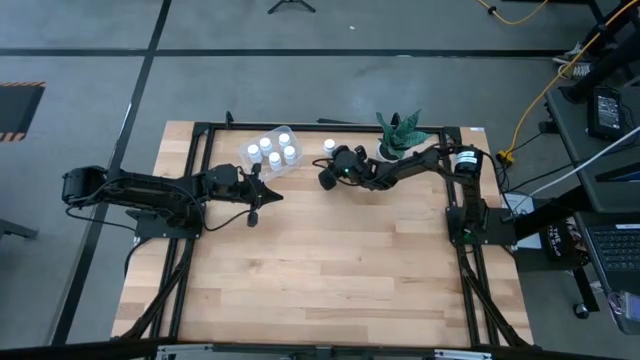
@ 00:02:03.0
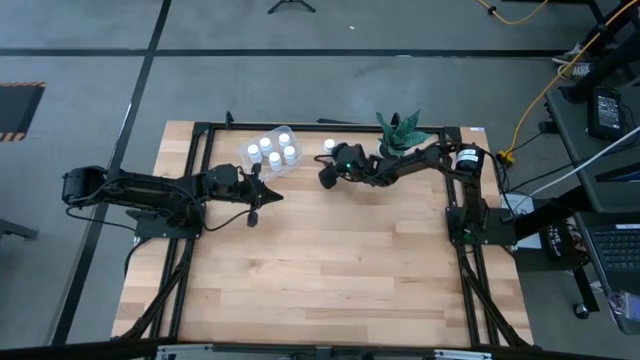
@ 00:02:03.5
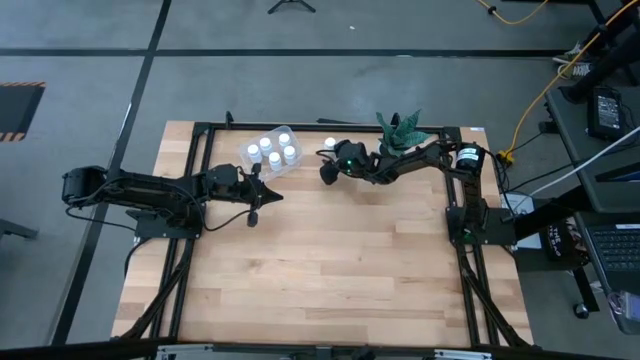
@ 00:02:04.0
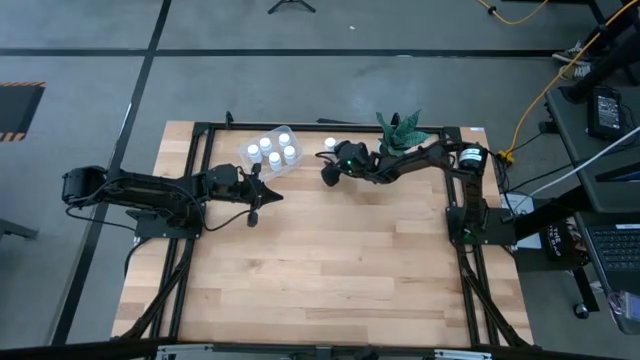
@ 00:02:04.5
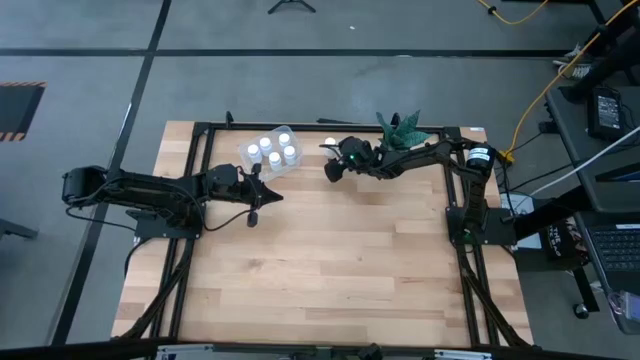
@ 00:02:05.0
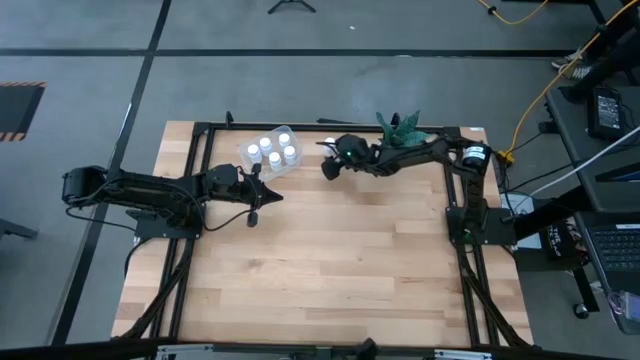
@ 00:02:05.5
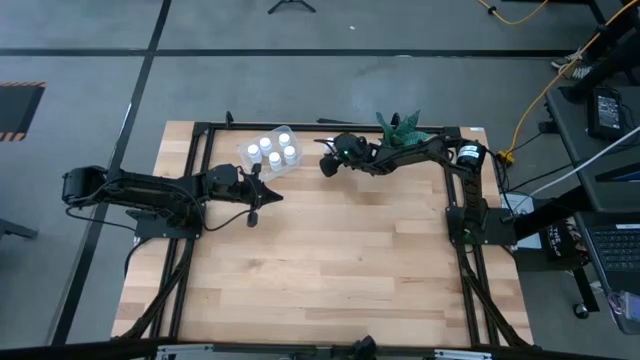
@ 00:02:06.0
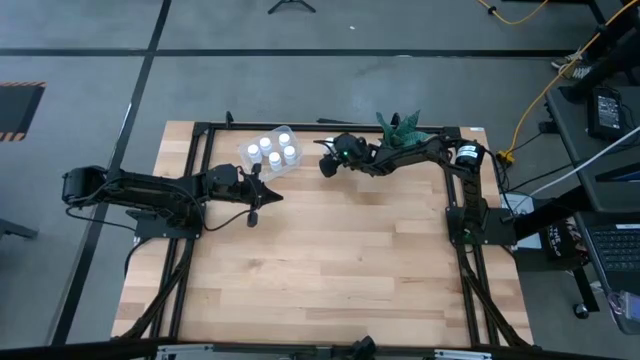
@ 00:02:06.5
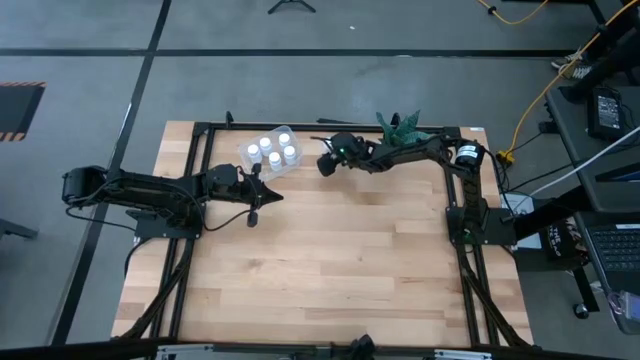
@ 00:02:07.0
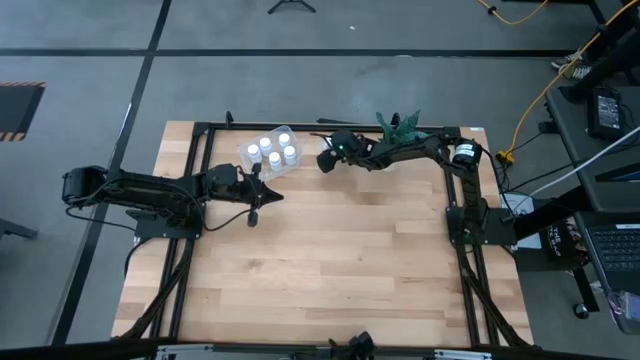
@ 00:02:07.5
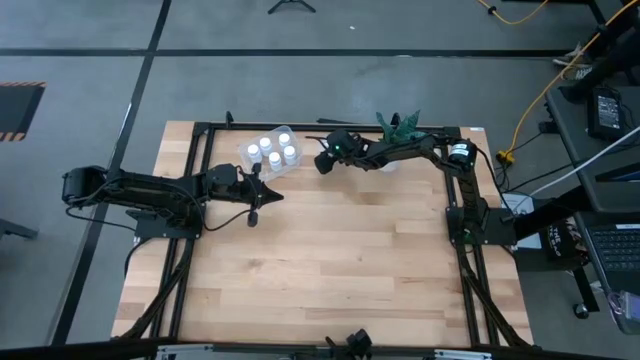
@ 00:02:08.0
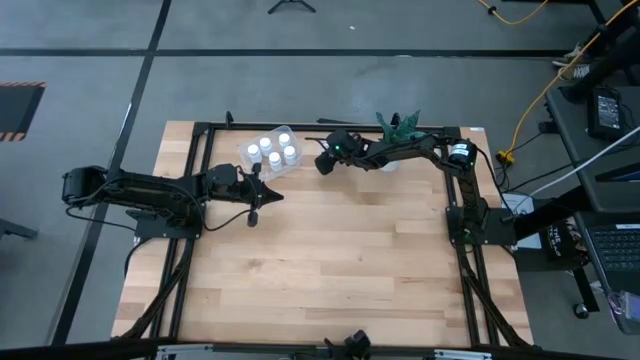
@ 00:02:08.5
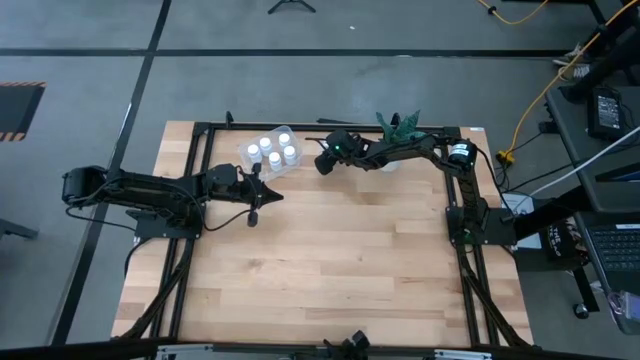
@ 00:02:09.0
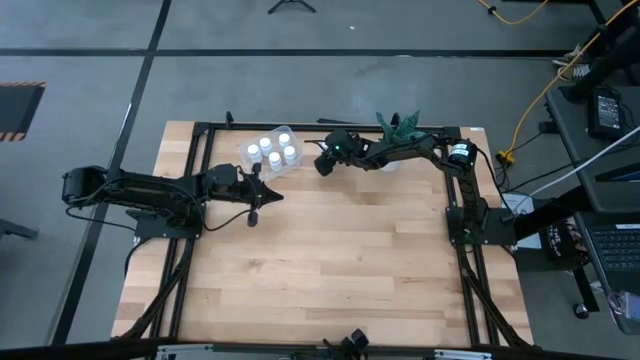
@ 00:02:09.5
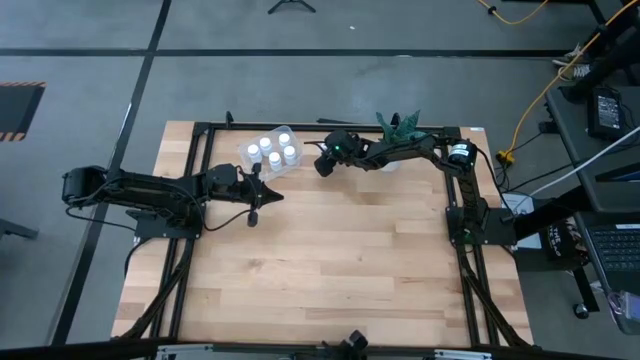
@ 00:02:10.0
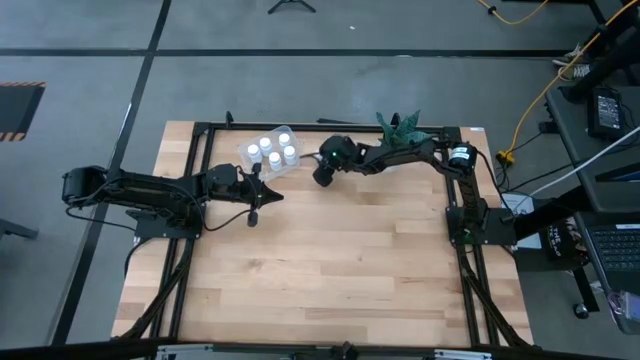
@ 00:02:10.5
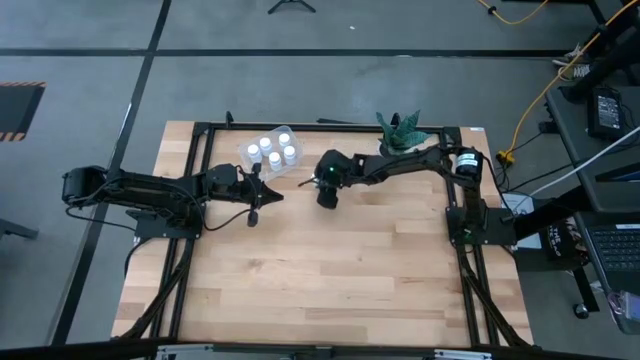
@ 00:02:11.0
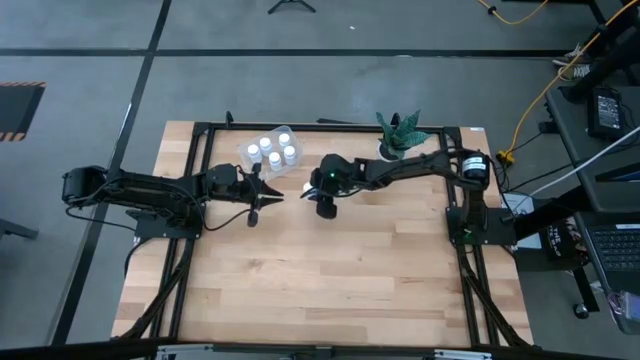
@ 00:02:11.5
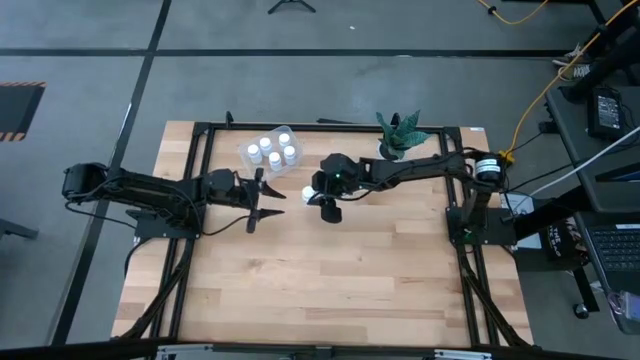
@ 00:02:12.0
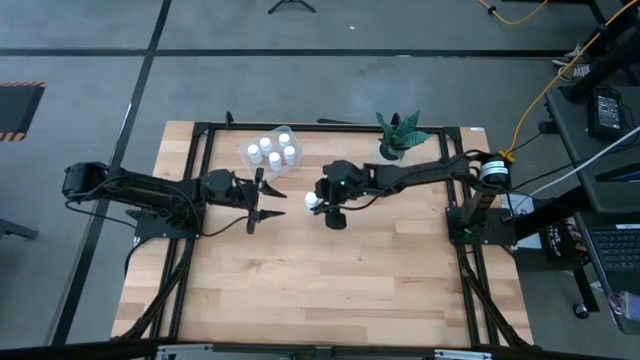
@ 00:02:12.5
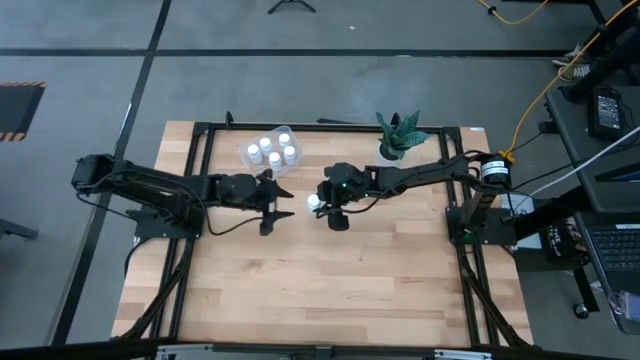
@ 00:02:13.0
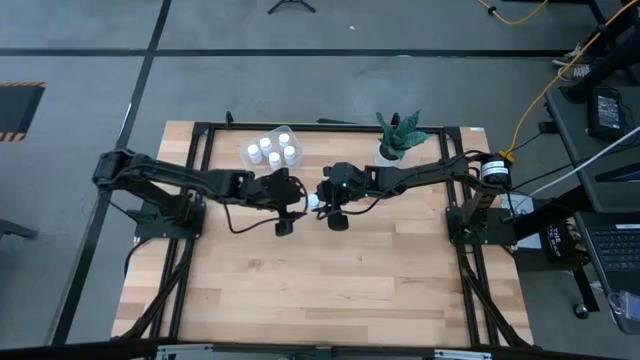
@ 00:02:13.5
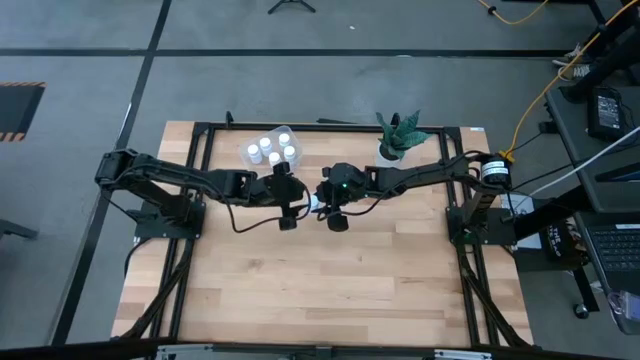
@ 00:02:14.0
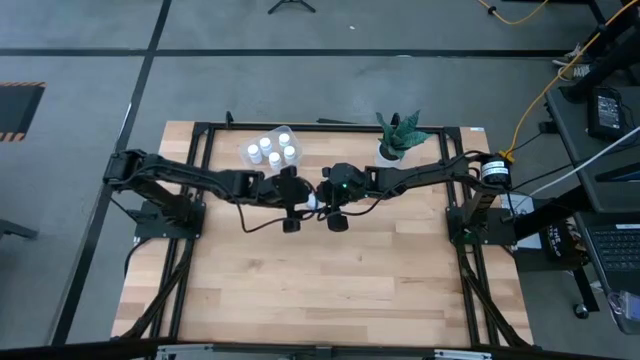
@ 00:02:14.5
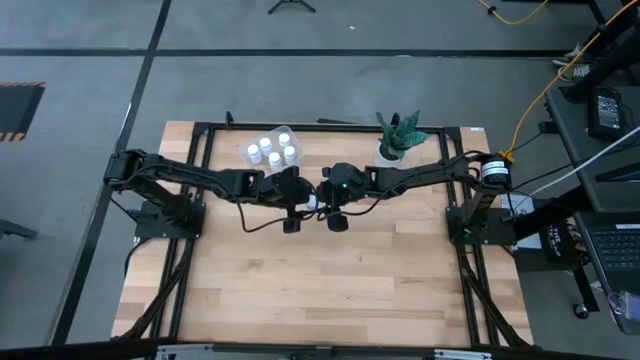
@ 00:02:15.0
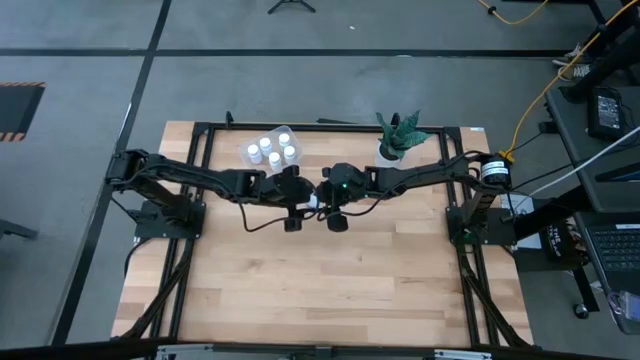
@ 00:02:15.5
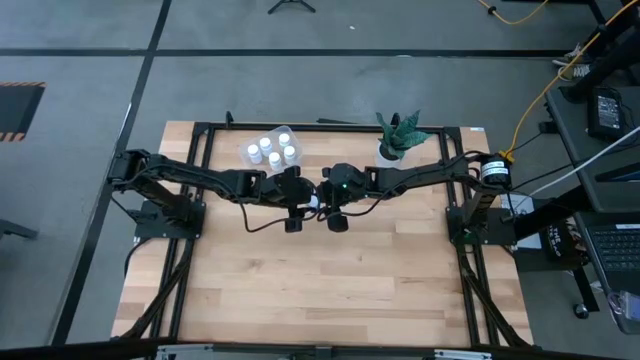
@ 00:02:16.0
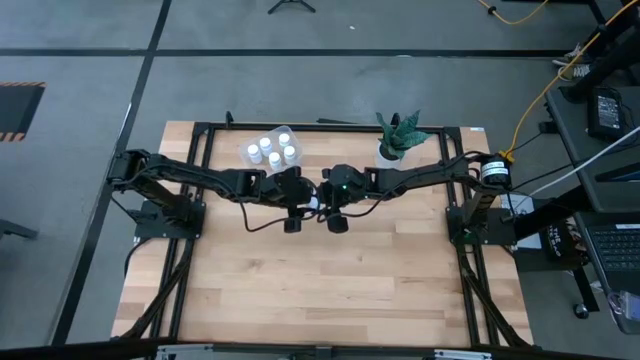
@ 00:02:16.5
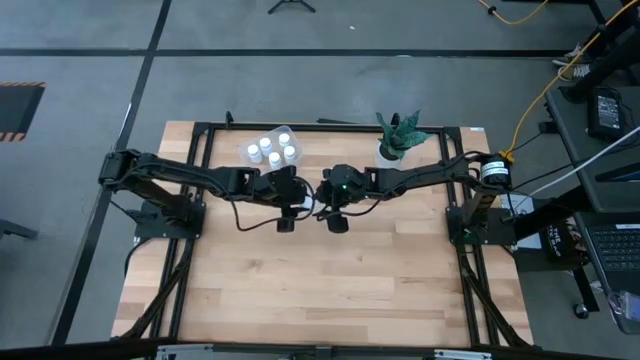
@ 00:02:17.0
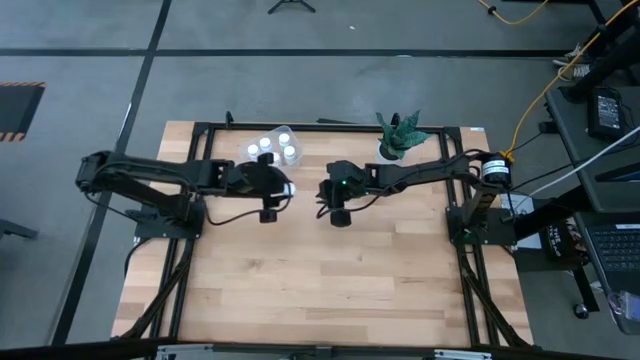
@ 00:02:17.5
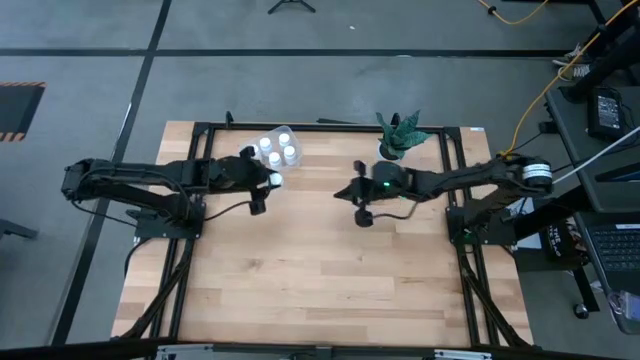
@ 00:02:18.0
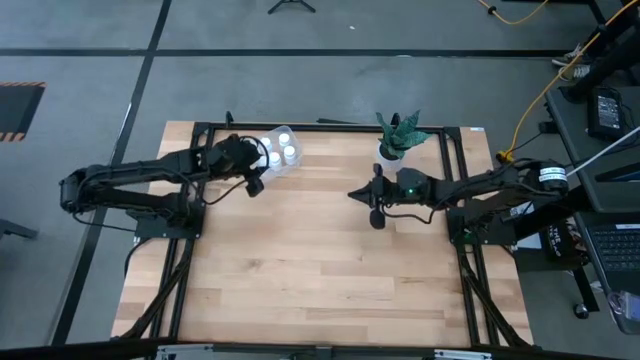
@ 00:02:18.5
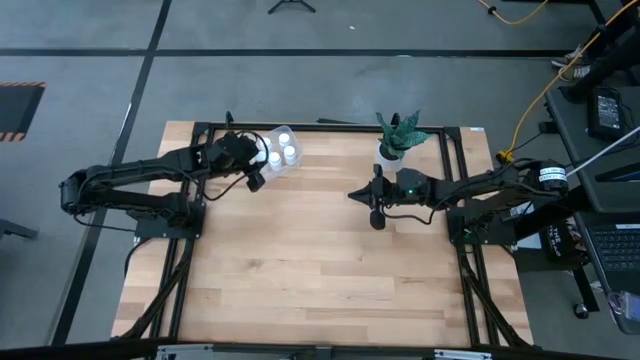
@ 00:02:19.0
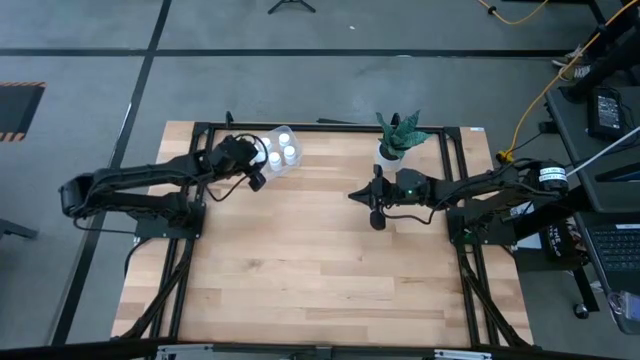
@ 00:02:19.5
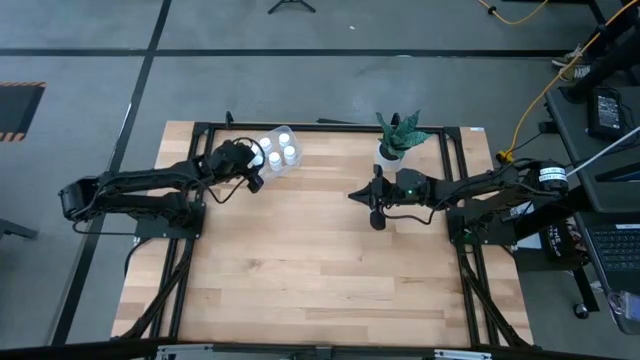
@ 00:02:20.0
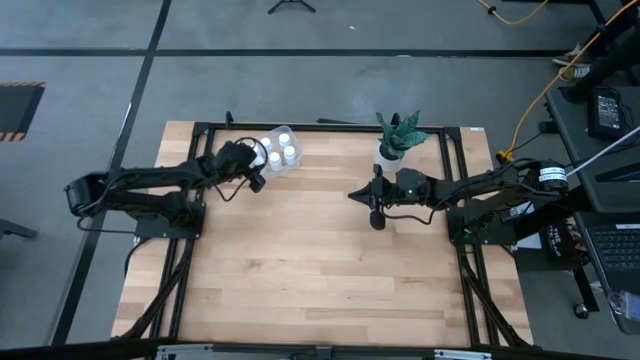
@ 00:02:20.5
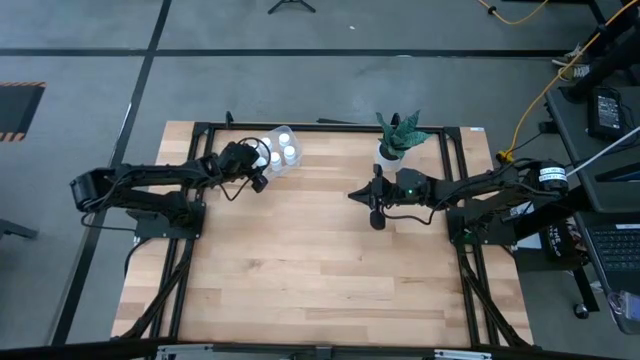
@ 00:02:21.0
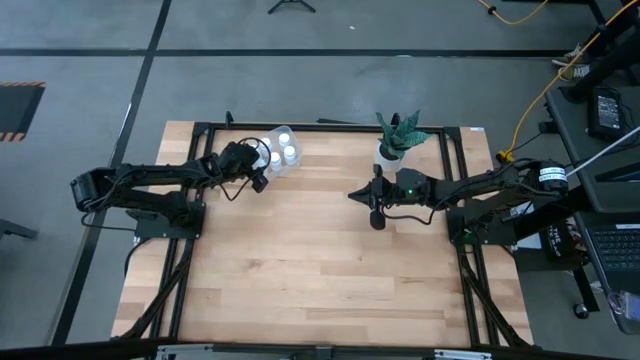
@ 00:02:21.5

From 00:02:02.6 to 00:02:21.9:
Task: Pick and place pill bottles into a basket
Put the white pill bottle into the transparent container

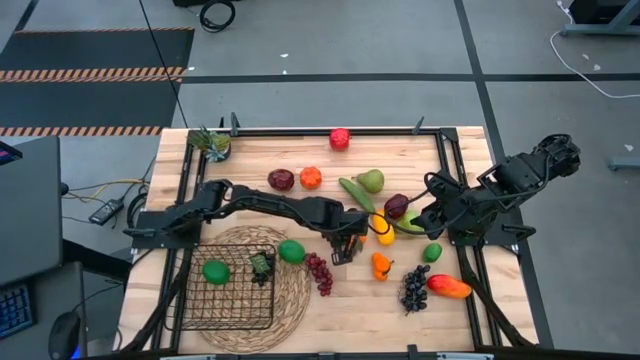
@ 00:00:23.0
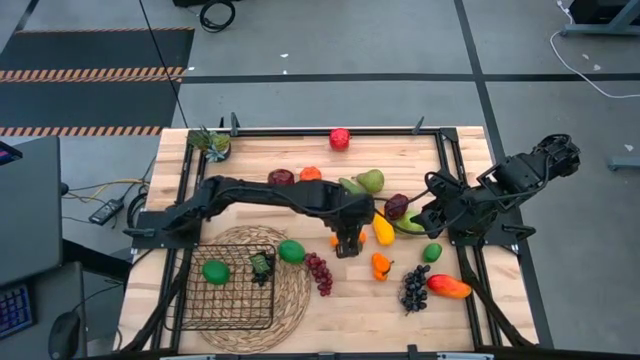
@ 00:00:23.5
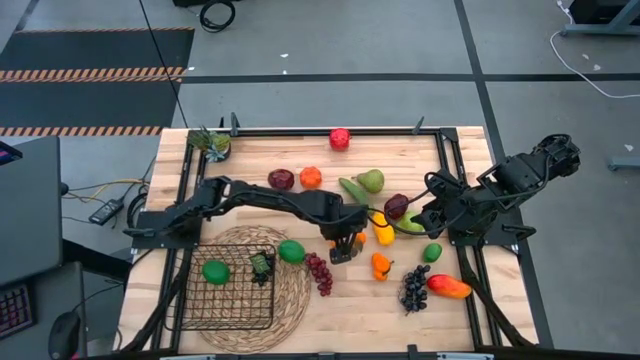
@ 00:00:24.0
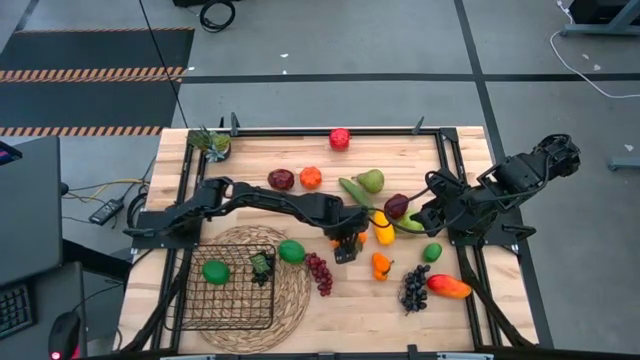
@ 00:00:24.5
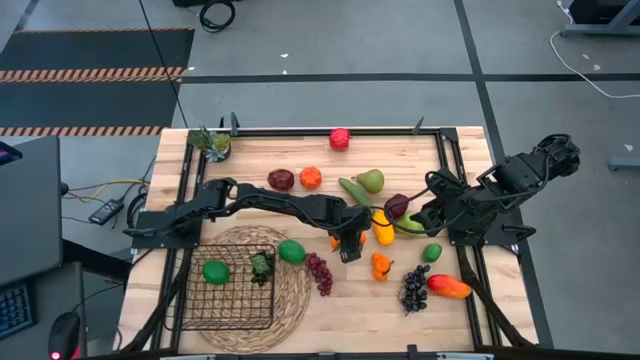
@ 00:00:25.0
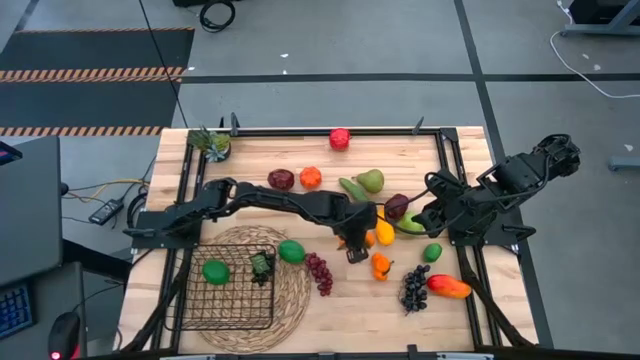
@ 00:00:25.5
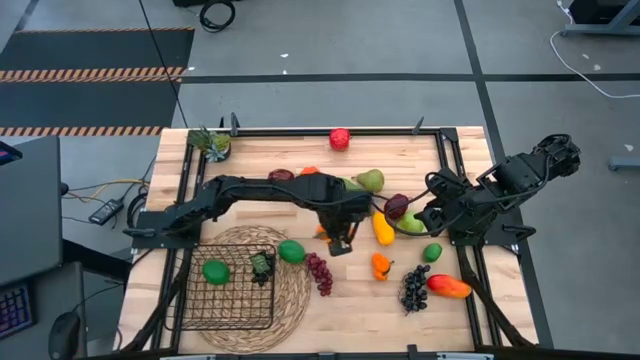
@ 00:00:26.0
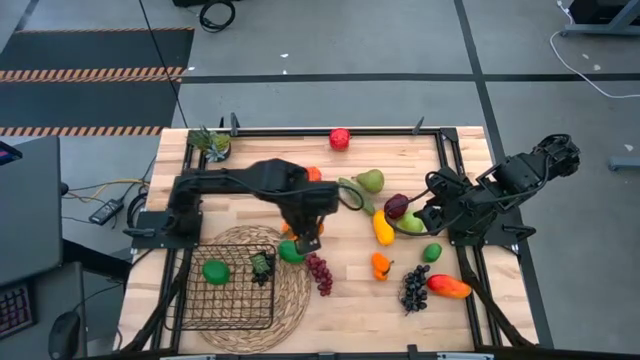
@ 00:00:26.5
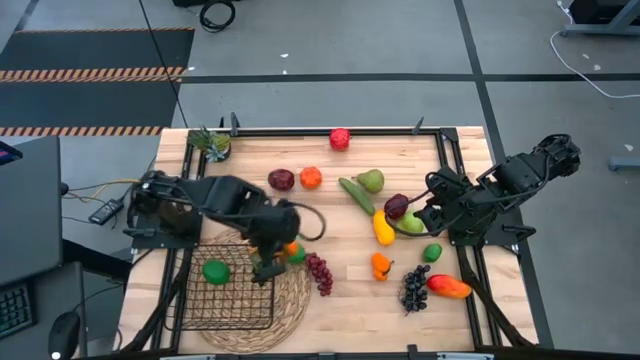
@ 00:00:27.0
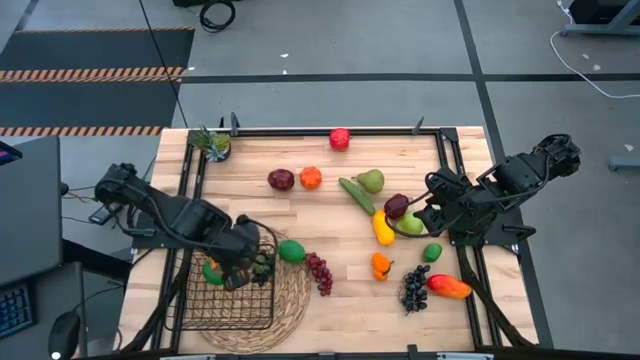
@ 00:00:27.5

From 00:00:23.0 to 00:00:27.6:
Task: Build produce basket
Put the top tangerine into the black wire basket
